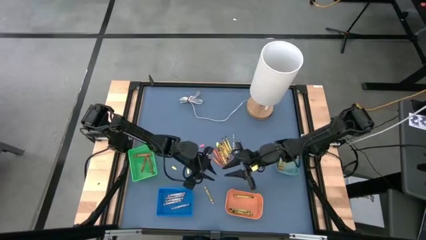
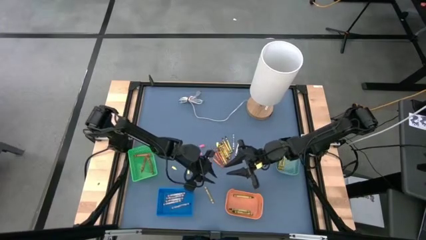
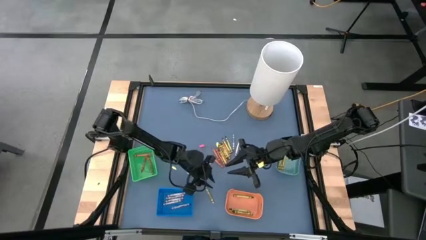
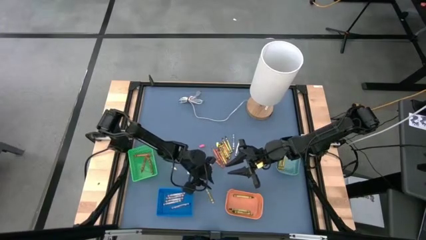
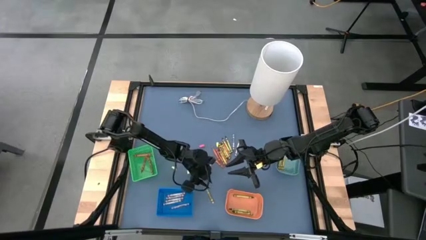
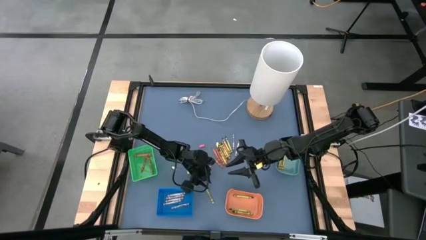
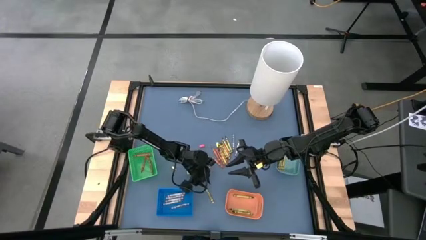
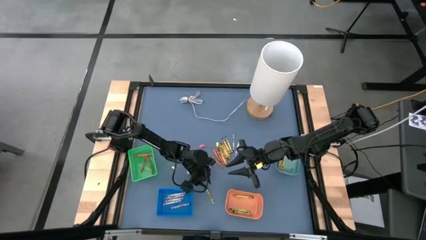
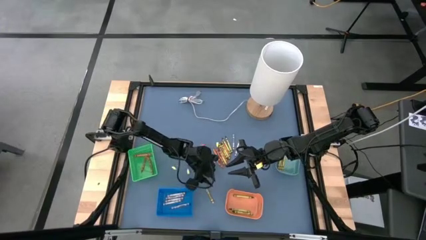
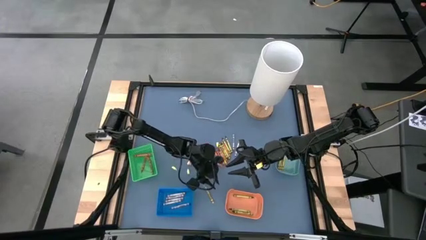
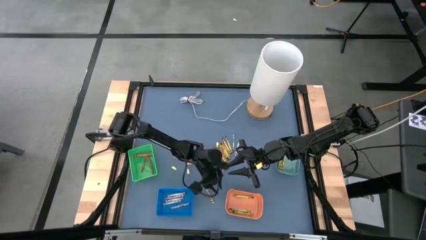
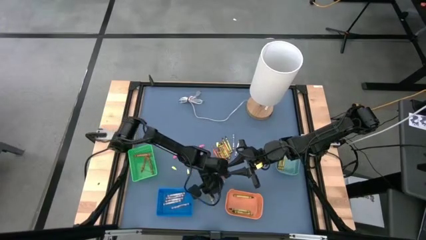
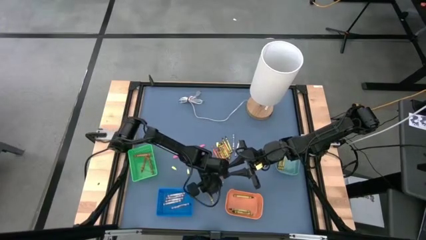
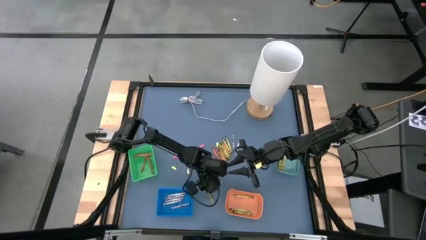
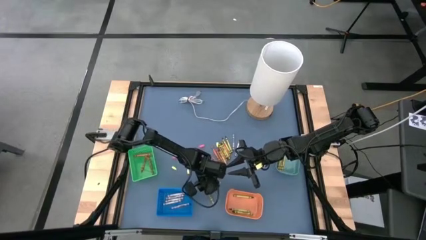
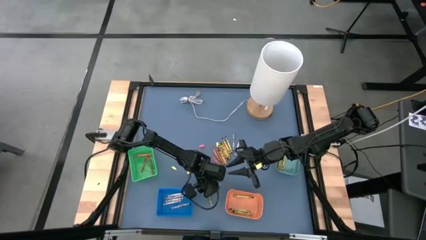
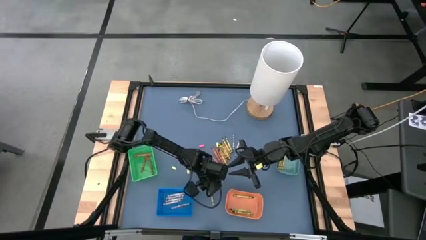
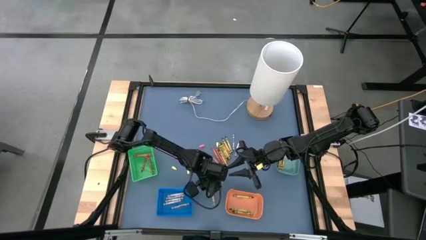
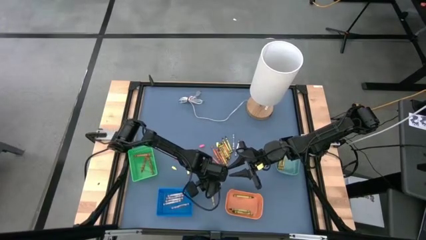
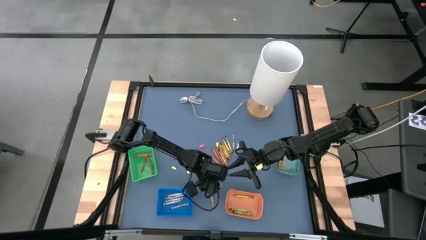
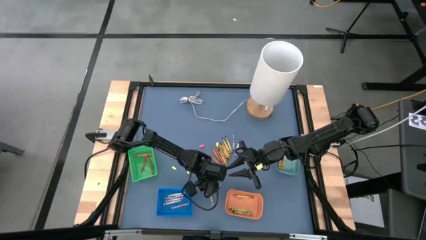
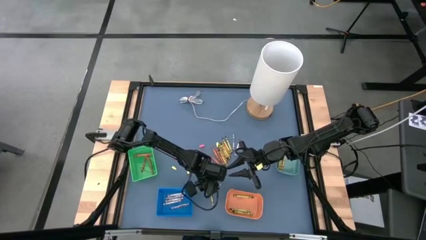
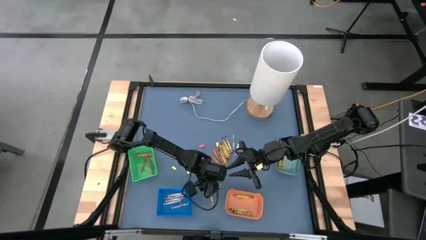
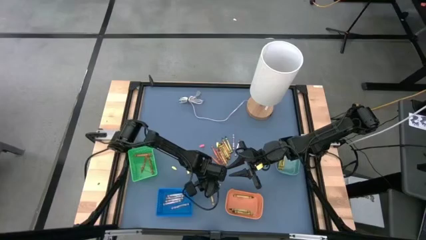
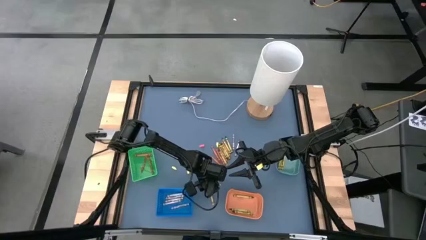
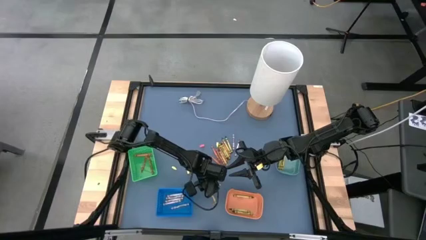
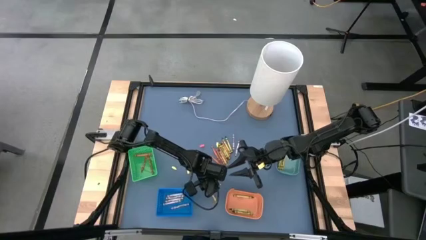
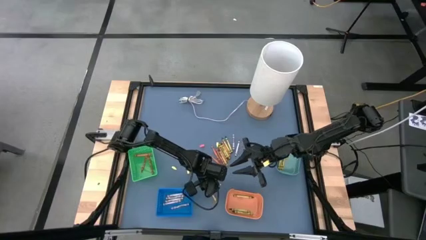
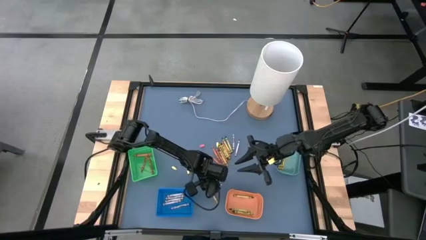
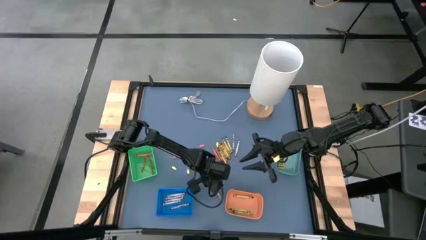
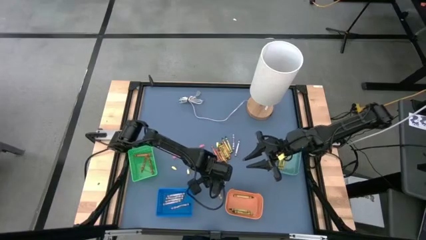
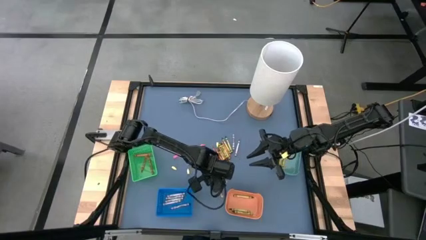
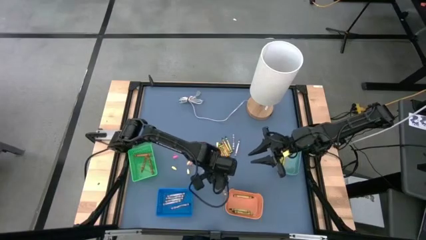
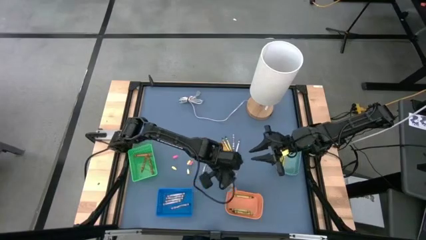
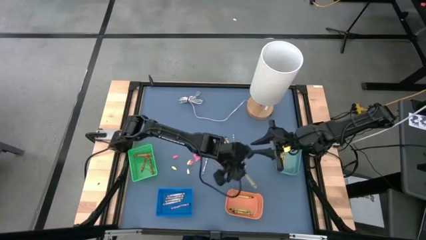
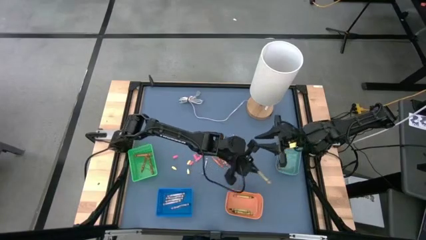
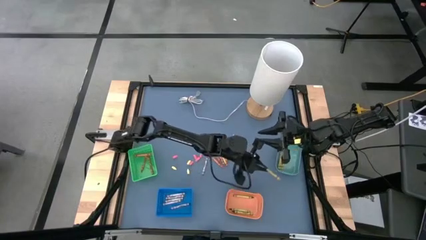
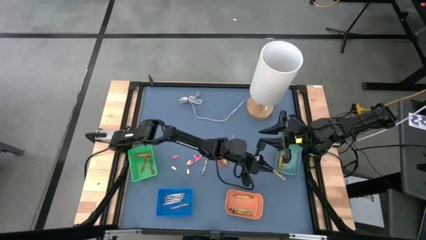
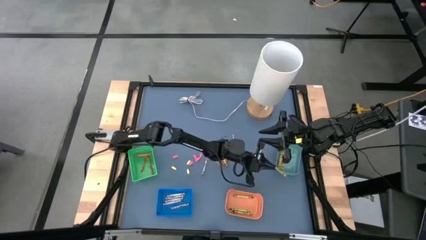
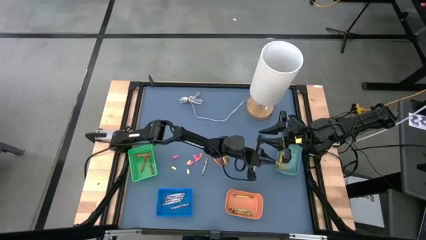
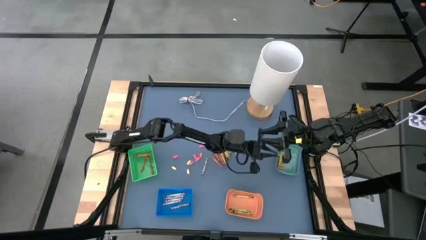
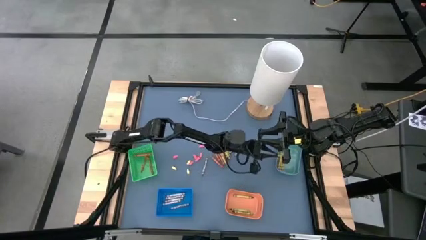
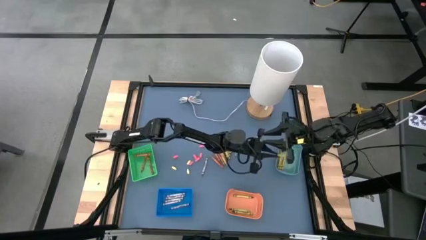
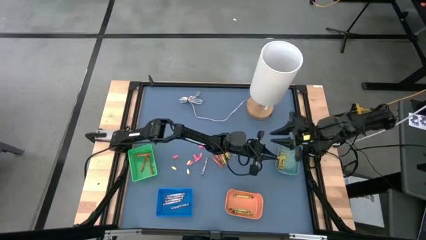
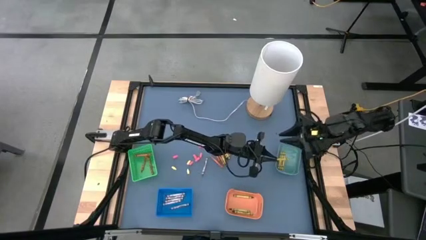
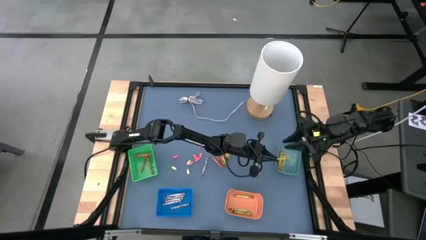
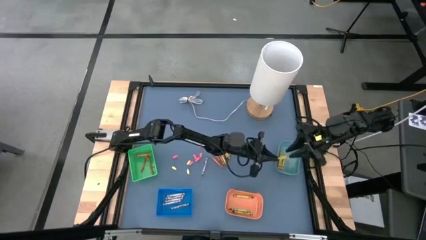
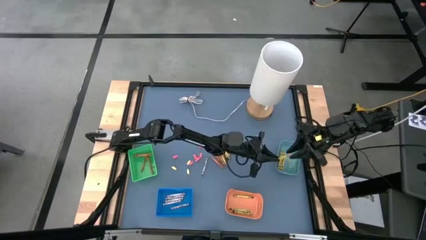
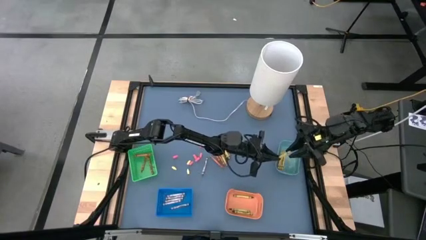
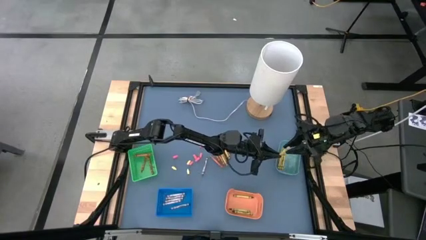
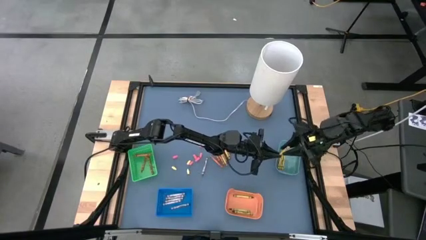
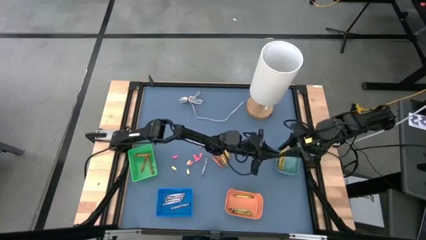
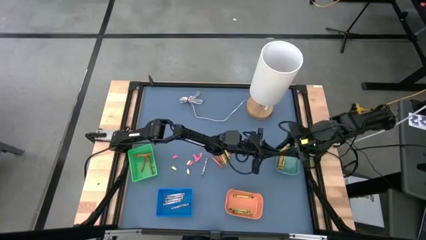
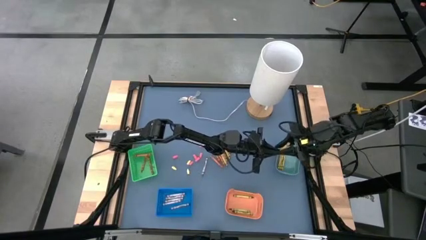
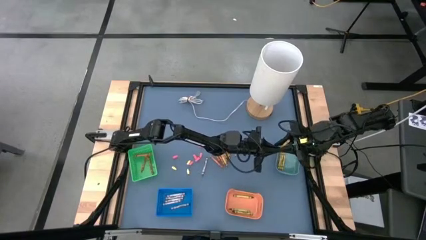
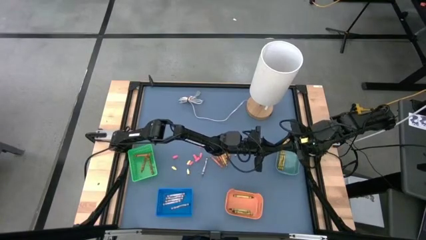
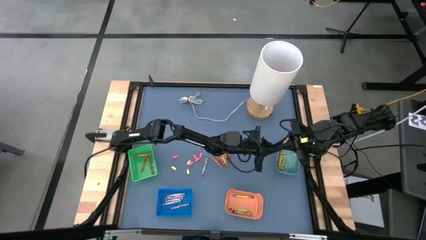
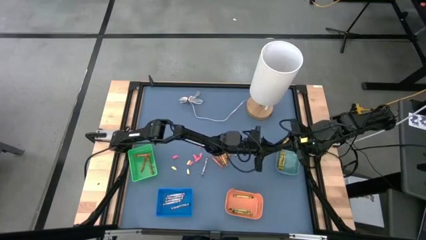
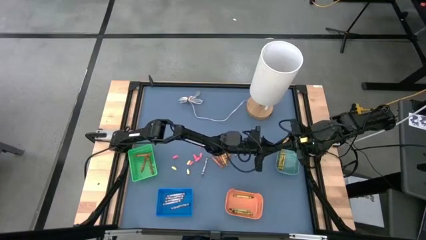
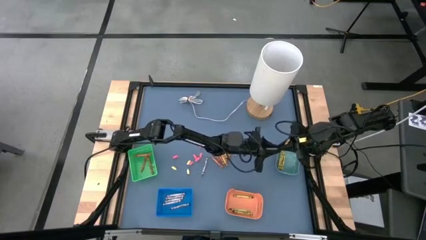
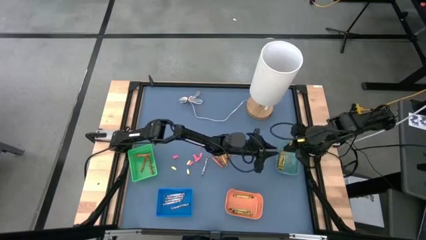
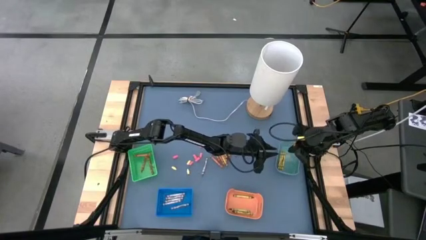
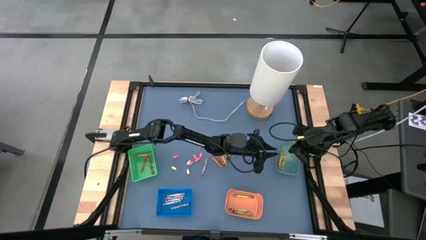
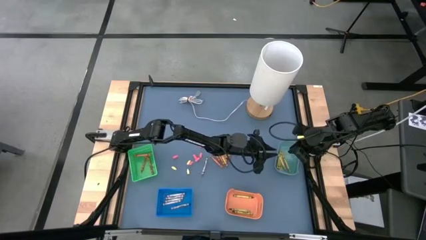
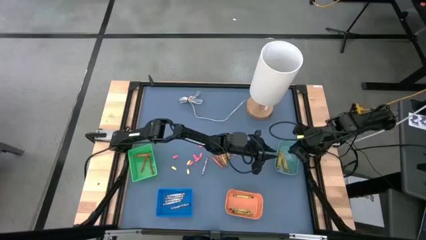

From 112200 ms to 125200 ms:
Task: Sort crayons
Put the yellow crayon into the dark green bin

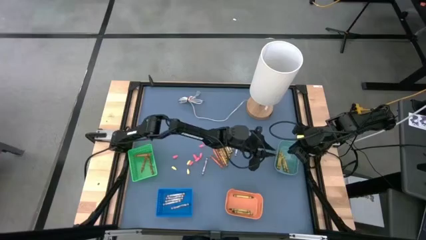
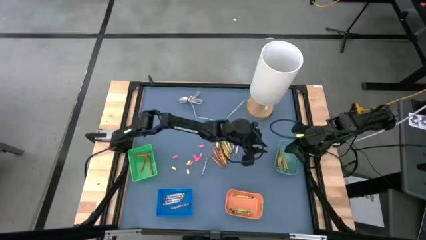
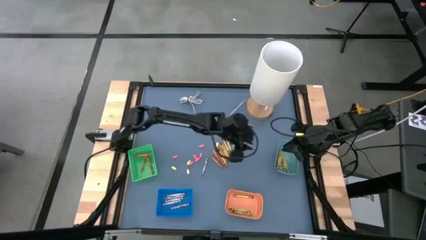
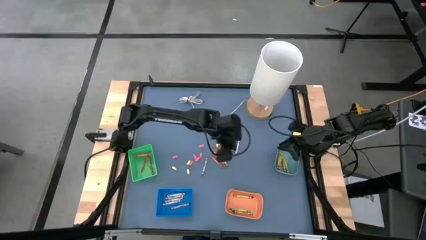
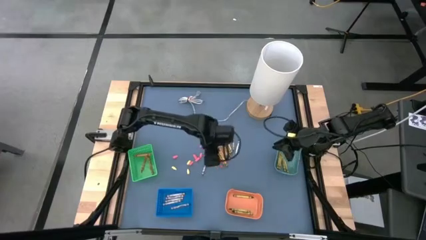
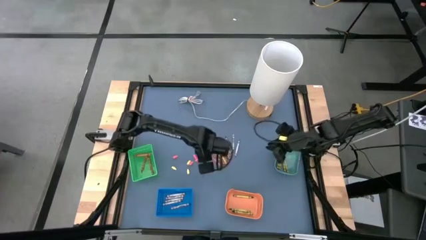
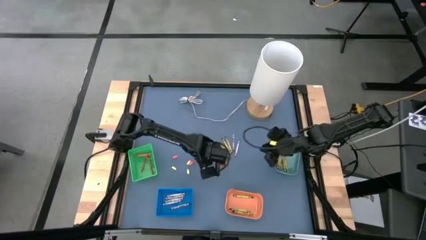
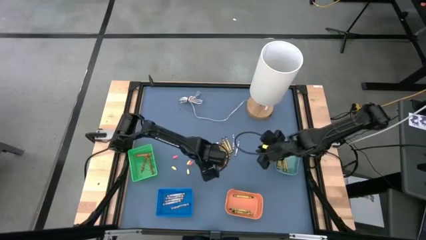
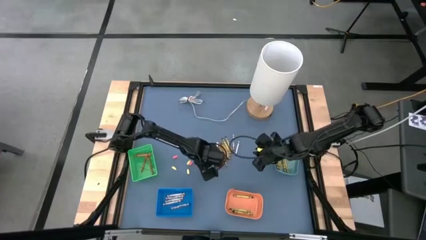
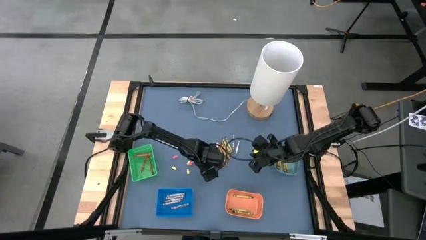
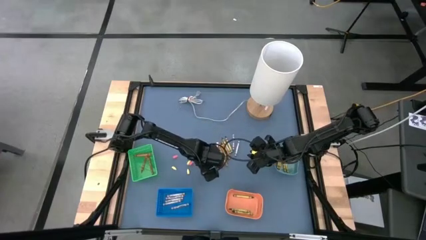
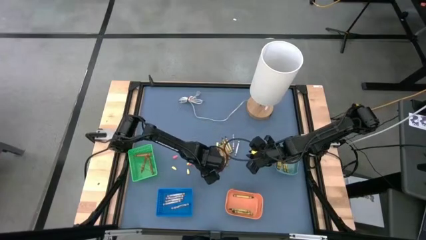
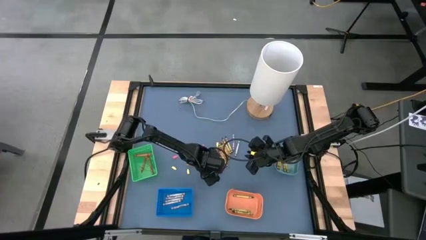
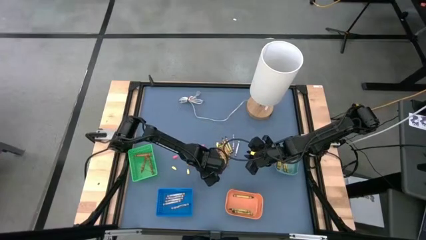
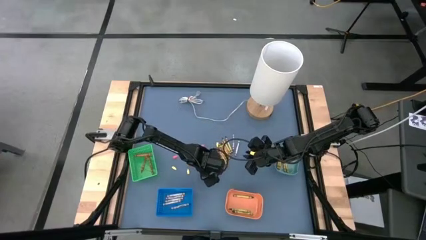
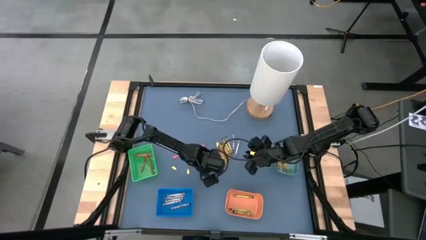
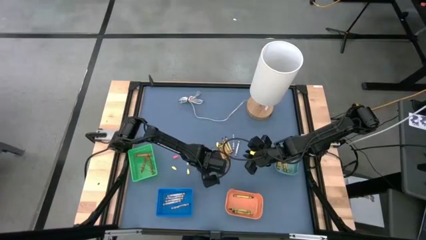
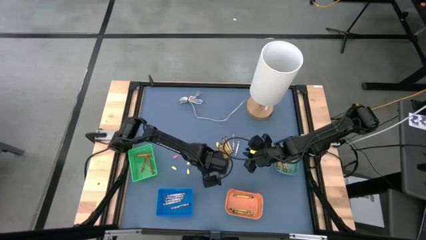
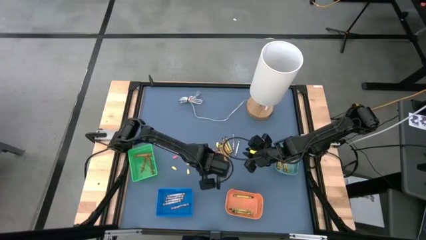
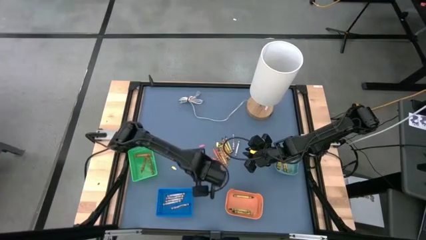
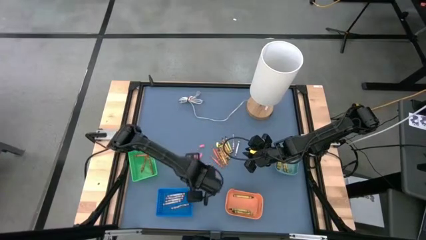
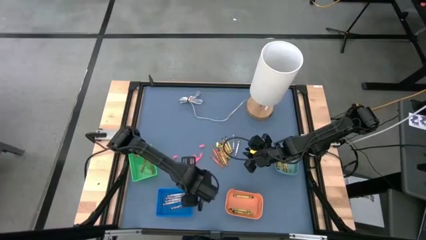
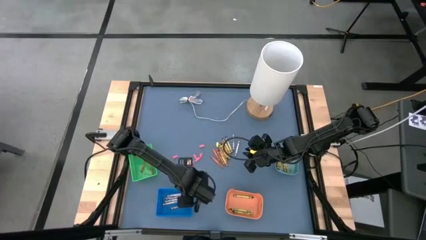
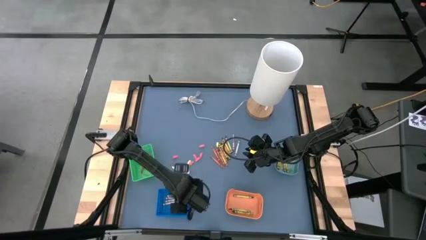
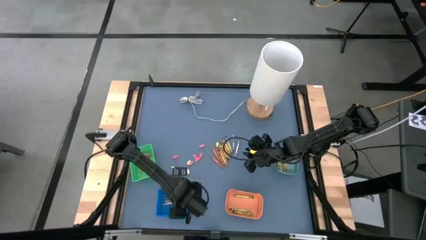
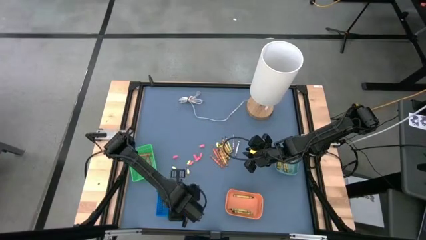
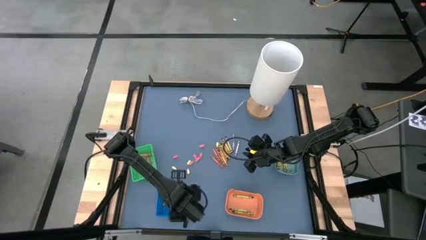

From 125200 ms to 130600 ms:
Put the gray crayon into the blue bin
